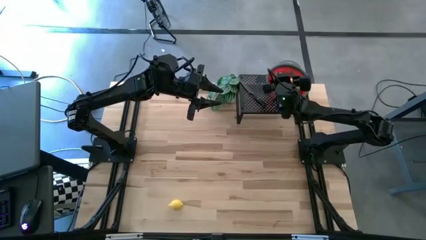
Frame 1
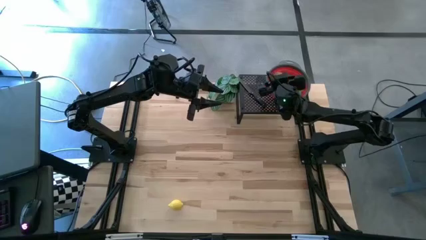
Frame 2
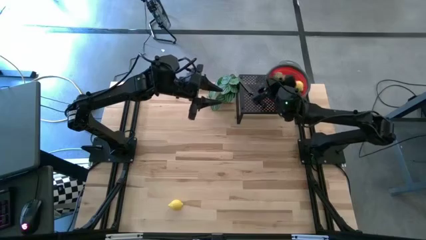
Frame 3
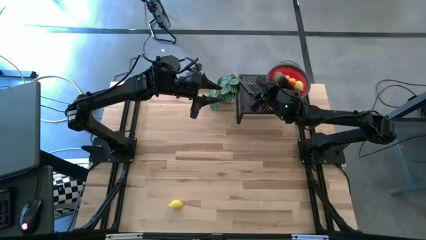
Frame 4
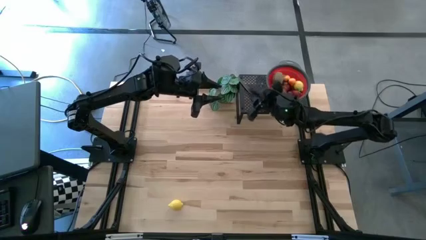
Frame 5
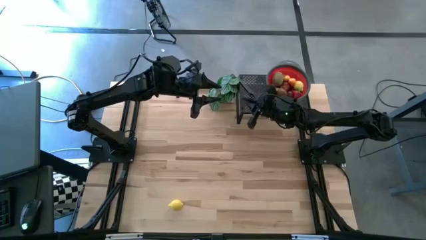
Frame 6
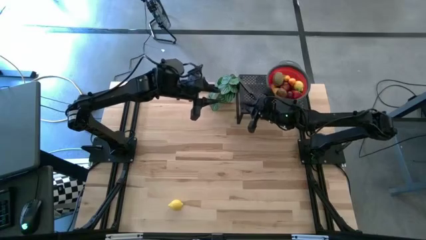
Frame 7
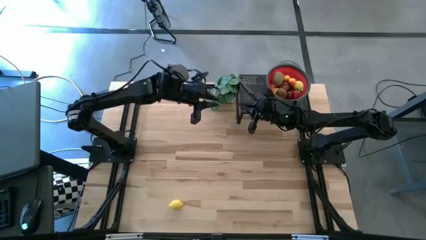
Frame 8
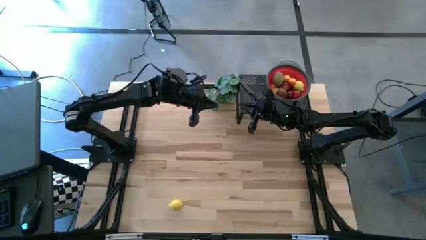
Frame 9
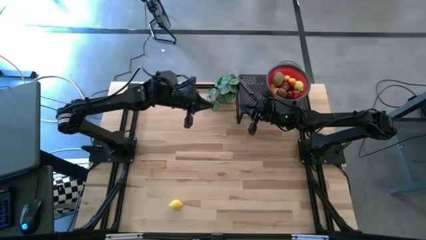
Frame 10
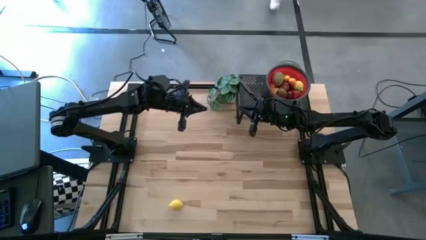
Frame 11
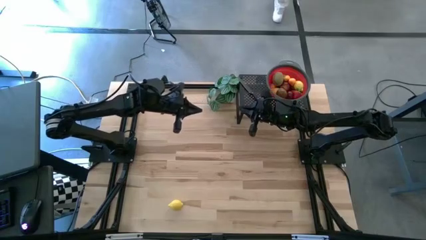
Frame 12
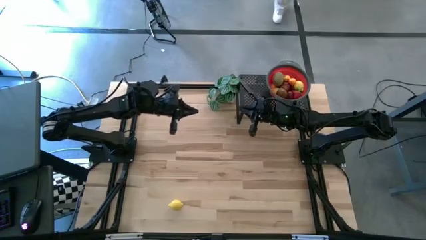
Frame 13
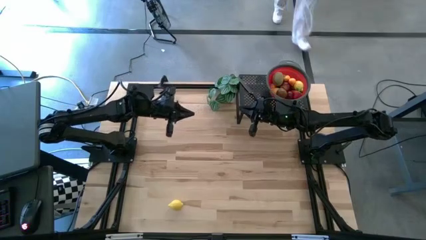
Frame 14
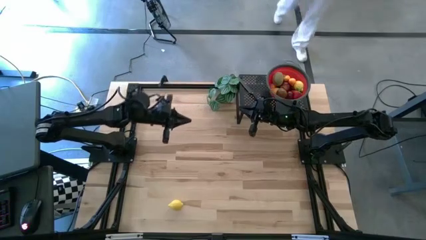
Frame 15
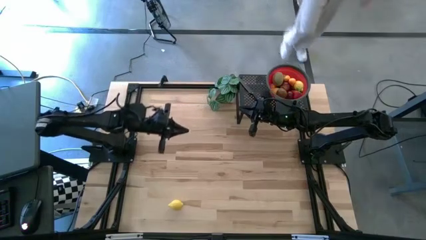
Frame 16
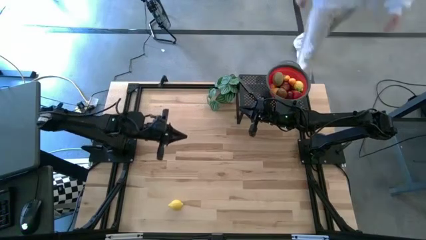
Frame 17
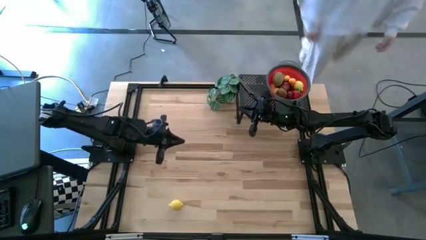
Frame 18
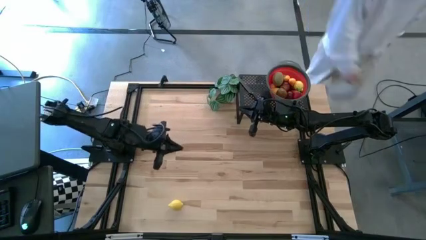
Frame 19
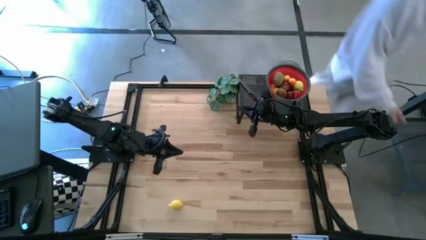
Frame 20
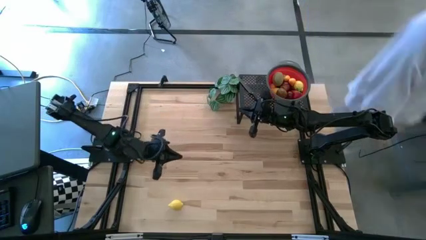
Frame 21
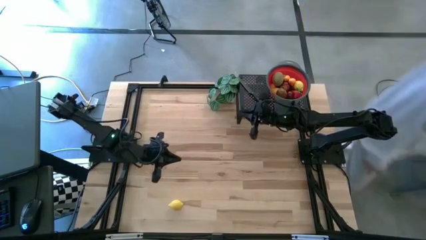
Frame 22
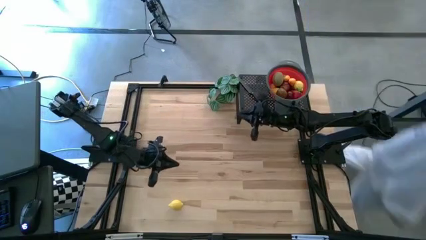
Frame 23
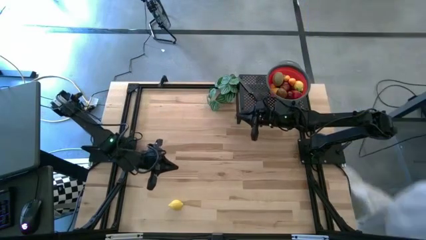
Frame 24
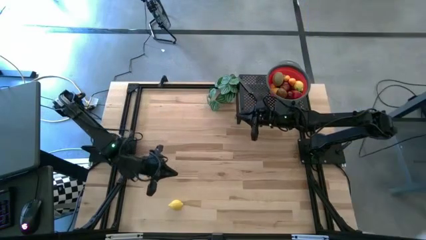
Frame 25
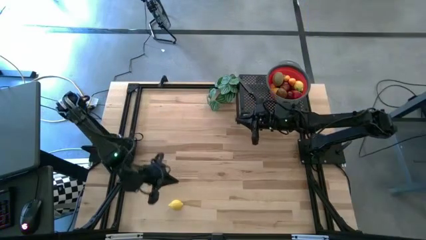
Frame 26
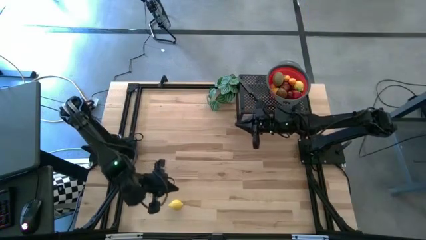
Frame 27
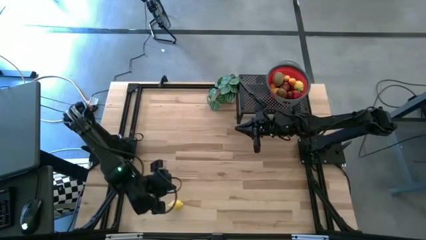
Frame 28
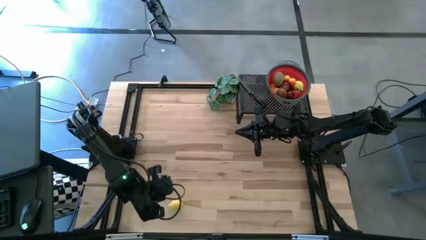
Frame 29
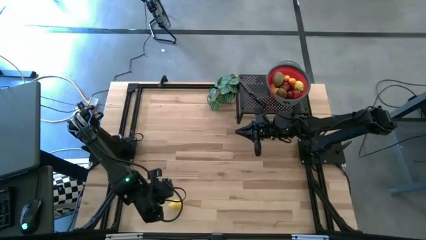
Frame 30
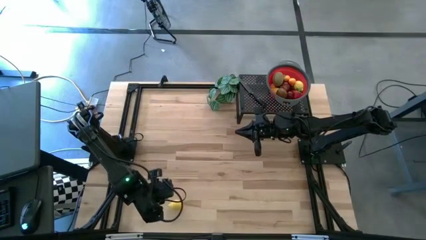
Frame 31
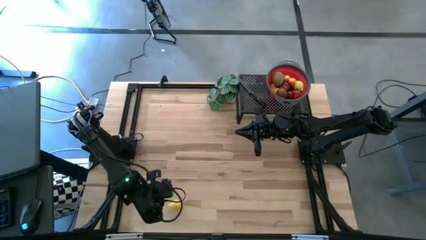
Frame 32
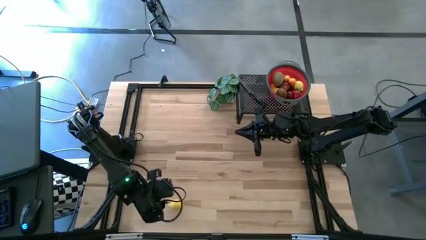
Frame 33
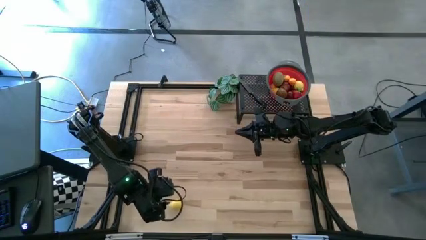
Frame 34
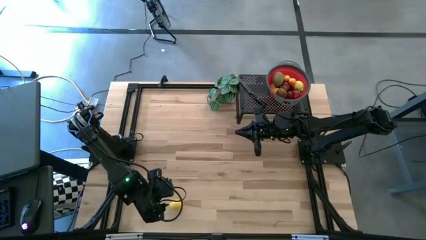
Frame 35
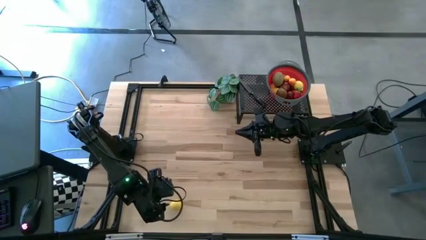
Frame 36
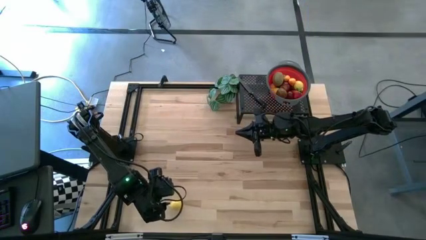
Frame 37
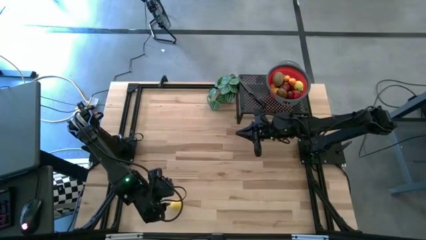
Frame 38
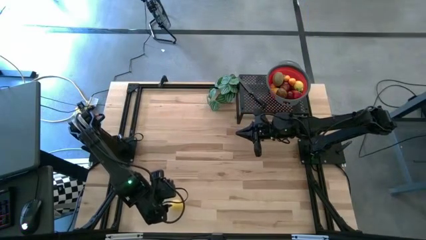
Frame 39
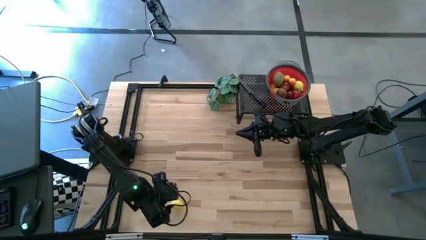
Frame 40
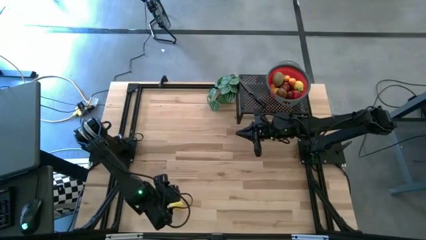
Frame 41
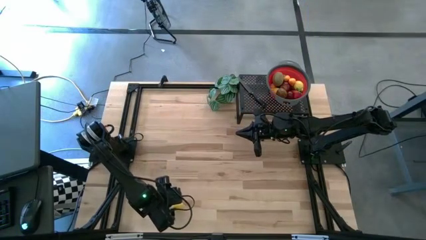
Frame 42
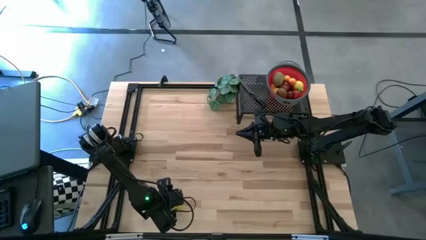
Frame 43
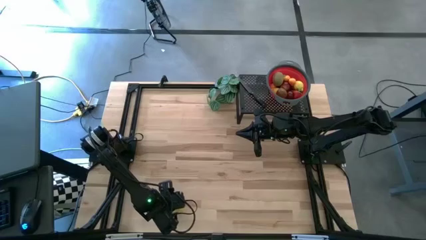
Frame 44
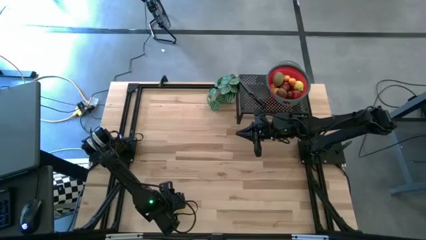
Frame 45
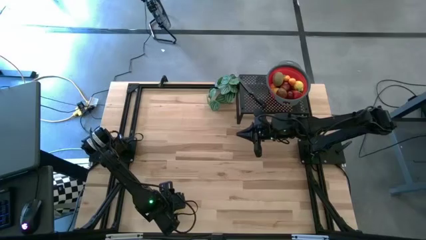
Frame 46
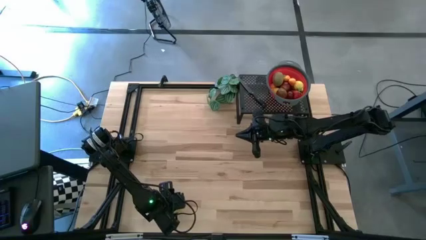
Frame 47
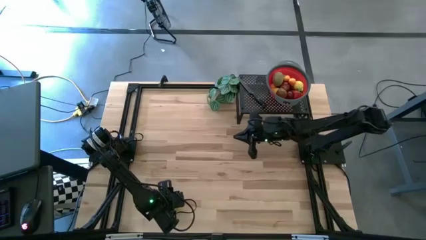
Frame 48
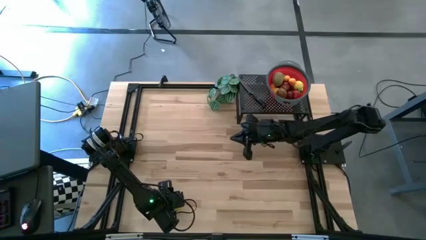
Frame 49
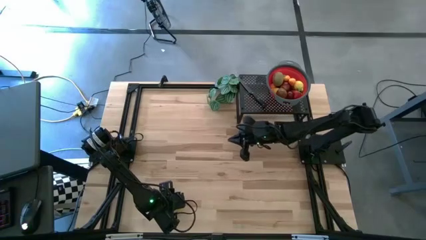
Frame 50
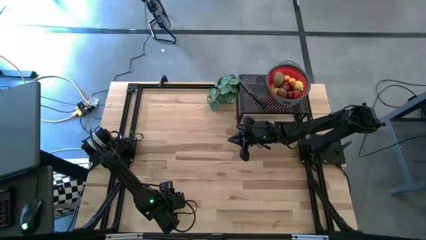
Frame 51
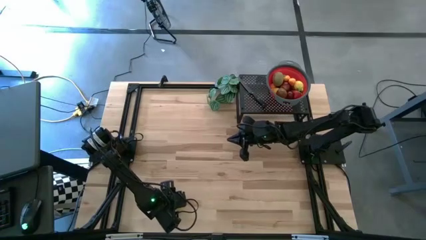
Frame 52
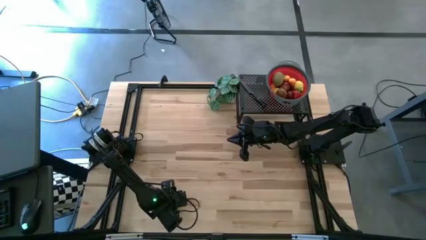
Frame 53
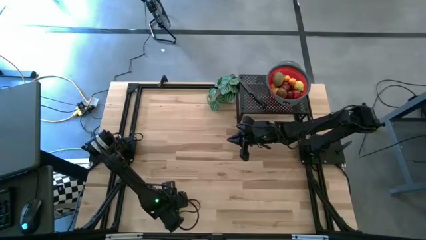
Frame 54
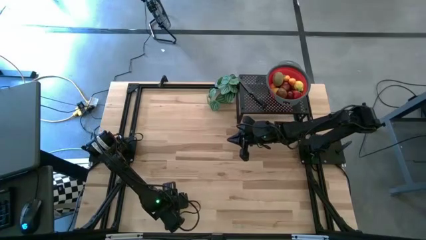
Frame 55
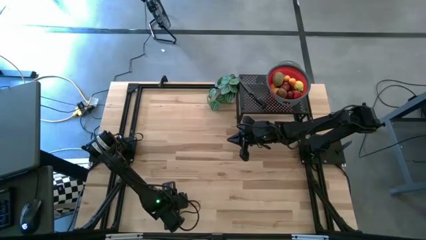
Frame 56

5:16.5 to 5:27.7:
Task: Pick & Place Fruit
Put the yellow lemon into the red strainer bowl

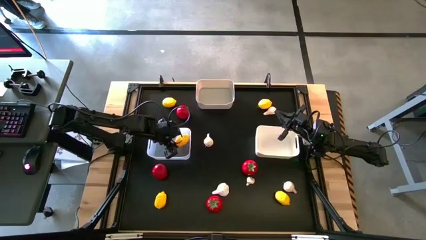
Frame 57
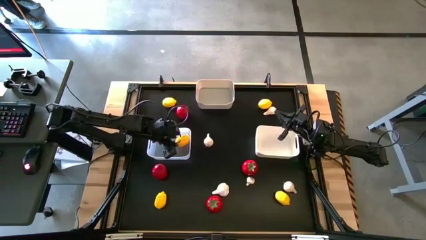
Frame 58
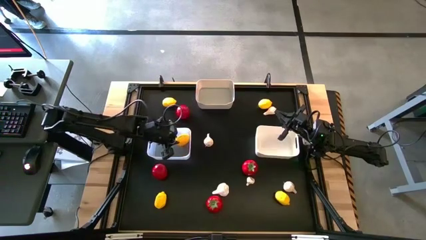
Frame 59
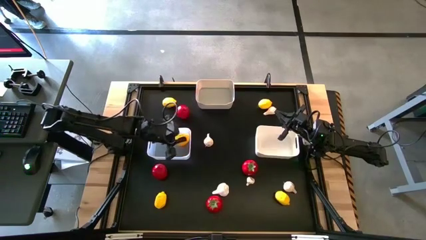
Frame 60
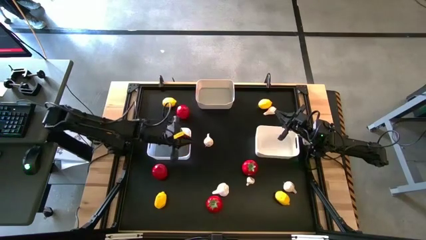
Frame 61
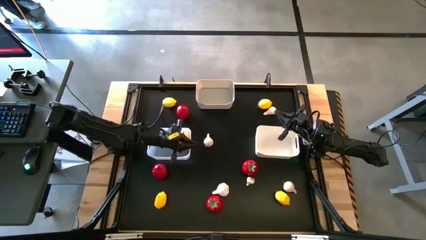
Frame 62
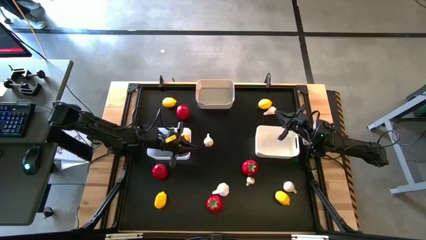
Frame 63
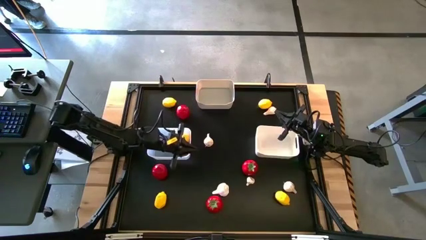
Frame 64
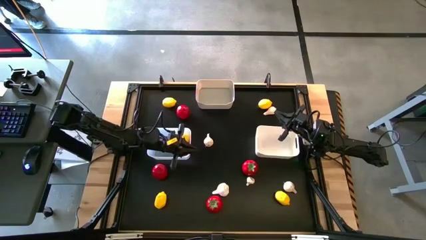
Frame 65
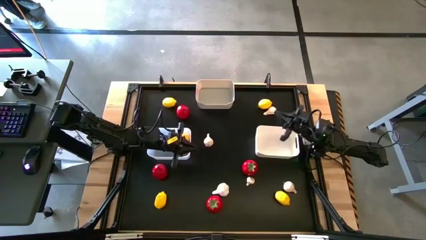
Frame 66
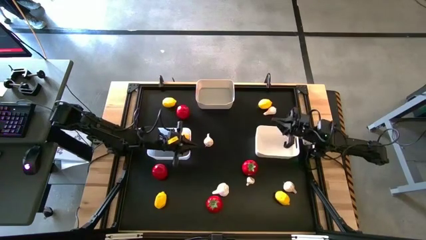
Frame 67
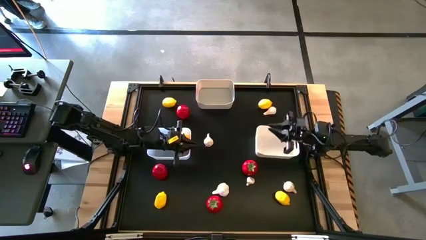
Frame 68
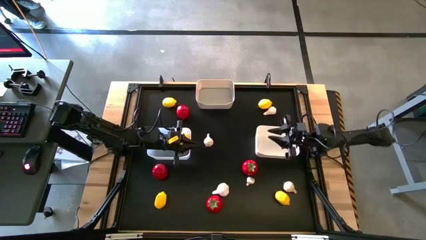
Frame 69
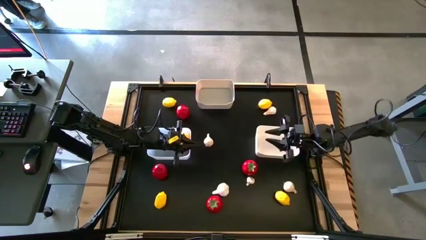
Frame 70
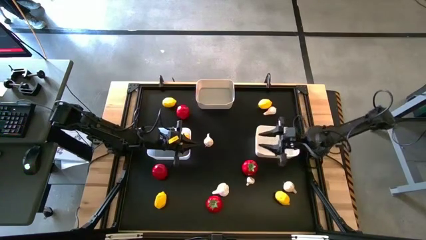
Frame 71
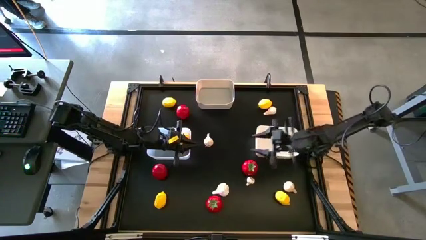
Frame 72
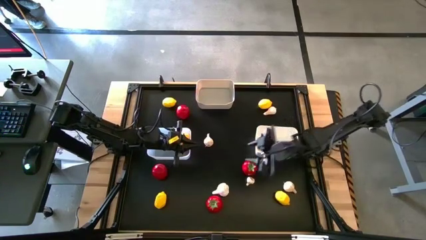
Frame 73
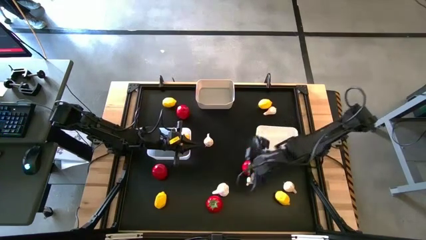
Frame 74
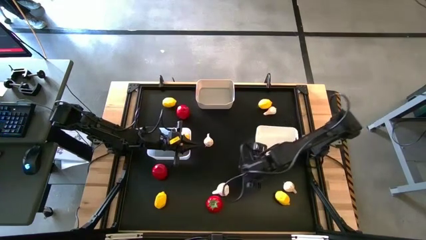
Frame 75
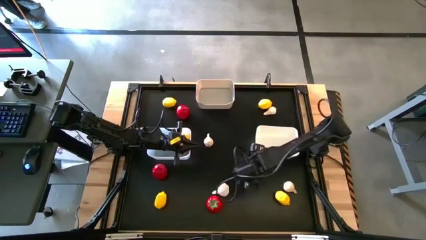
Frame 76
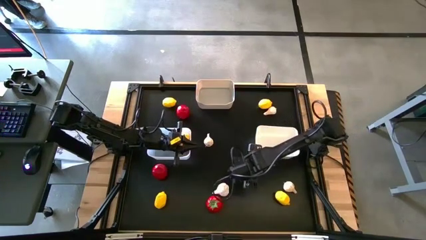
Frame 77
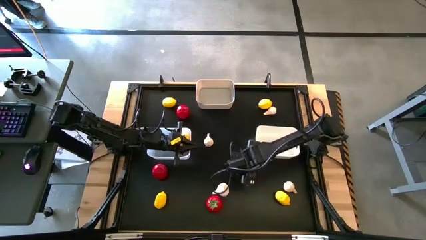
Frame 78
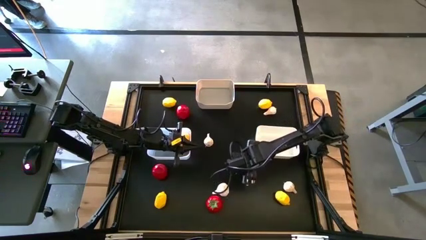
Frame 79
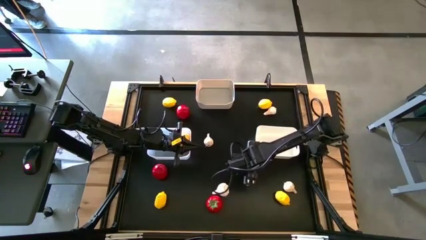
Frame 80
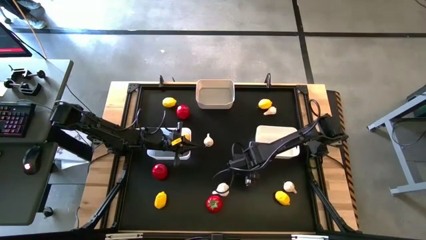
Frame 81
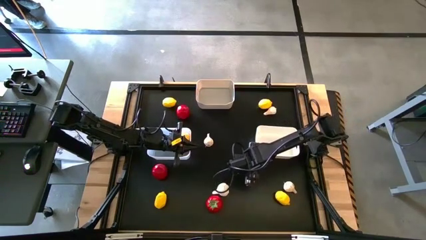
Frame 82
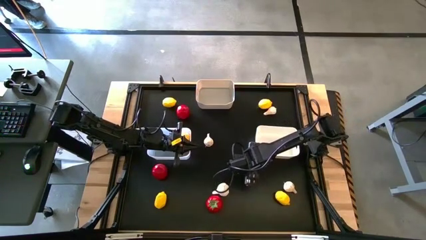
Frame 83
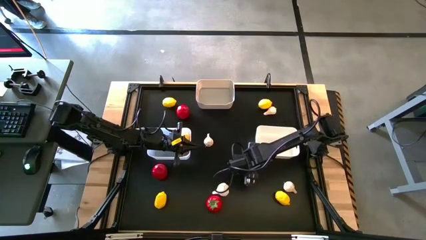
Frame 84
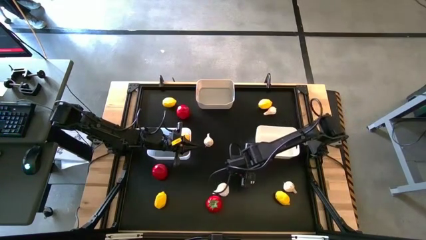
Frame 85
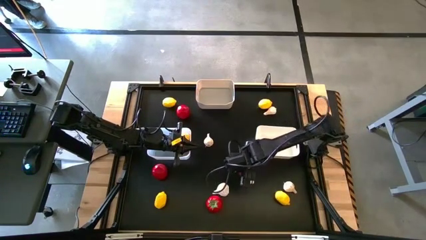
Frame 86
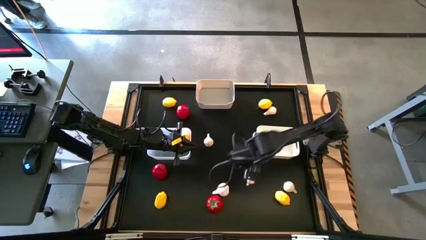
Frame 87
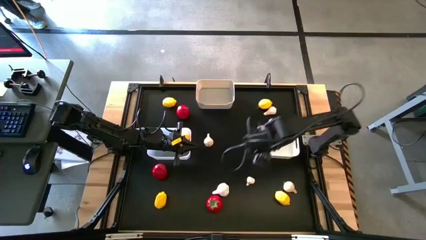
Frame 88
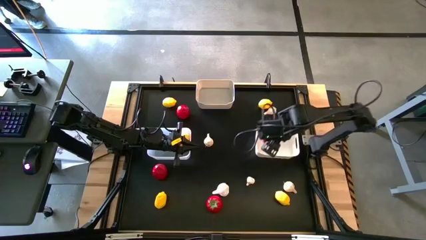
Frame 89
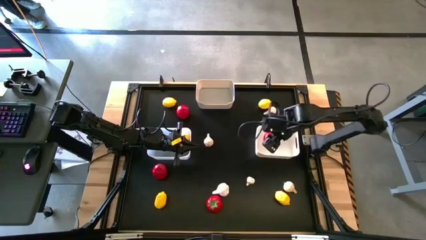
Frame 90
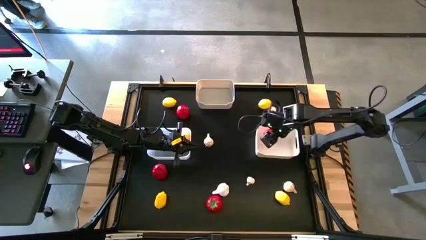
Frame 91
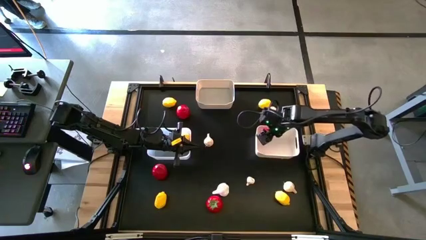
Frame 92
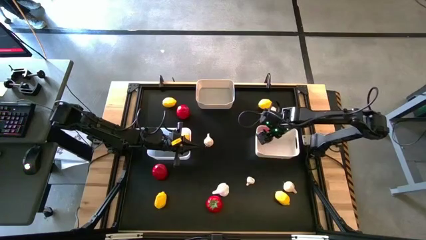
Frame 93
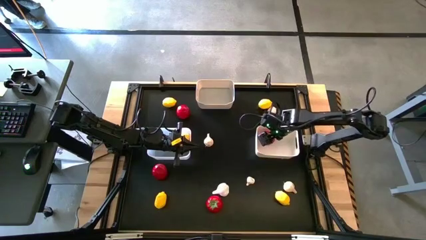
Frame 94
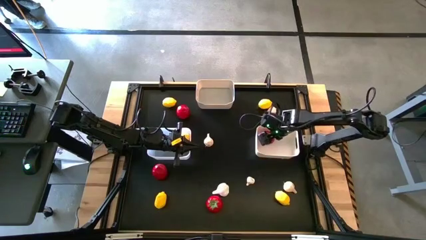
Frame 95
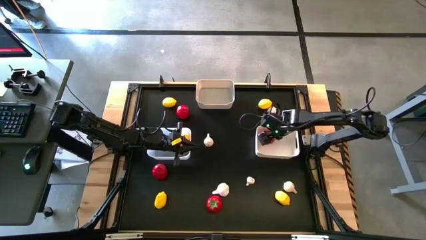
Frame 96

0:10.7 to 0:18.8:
Task: Sort produce into baskets
Put the red tomato into the bottom right white bin
